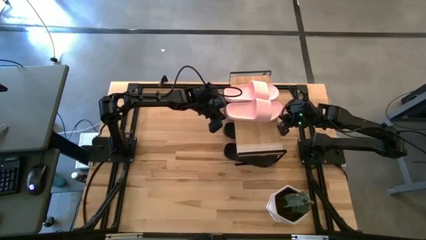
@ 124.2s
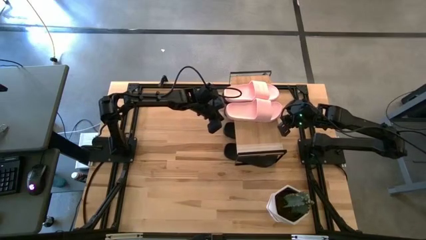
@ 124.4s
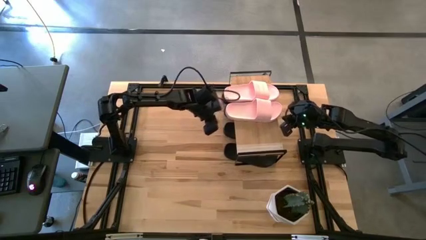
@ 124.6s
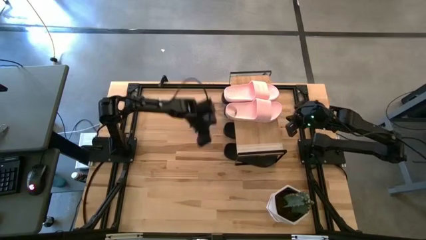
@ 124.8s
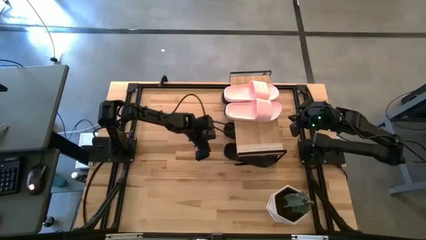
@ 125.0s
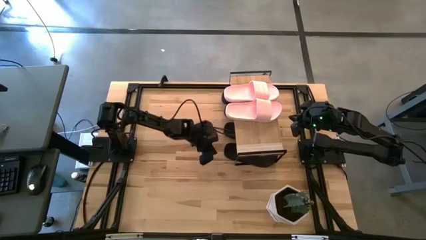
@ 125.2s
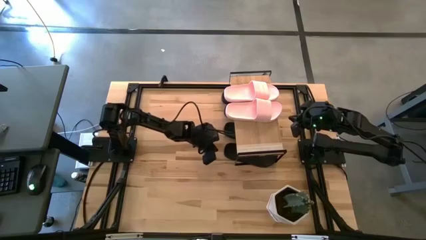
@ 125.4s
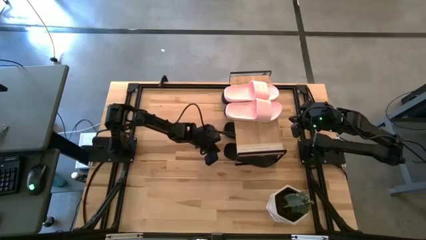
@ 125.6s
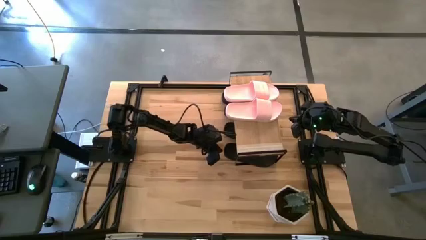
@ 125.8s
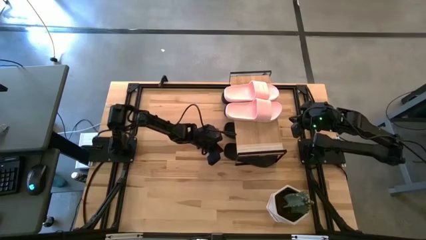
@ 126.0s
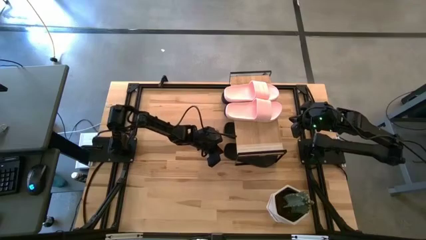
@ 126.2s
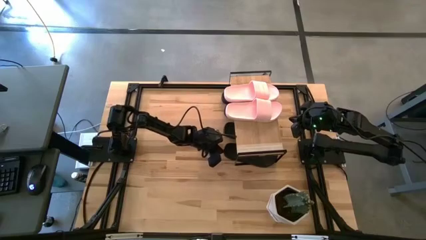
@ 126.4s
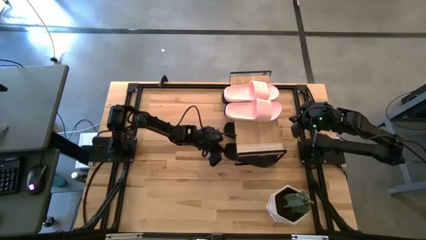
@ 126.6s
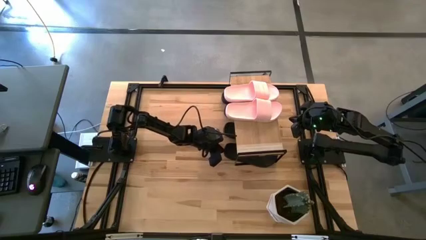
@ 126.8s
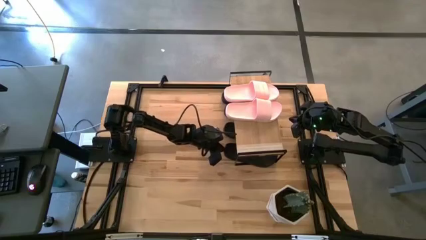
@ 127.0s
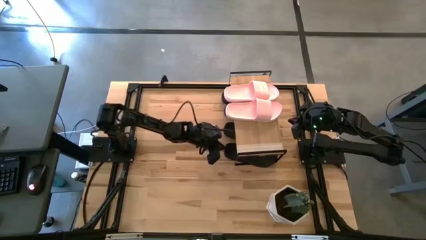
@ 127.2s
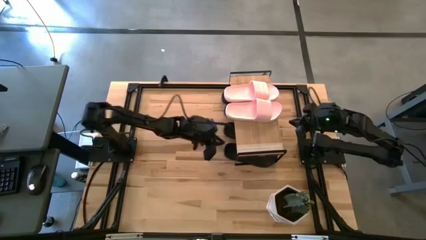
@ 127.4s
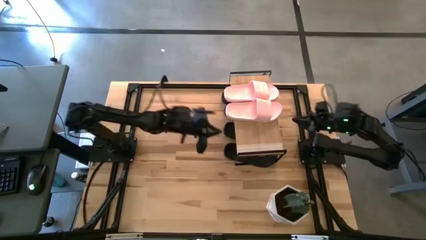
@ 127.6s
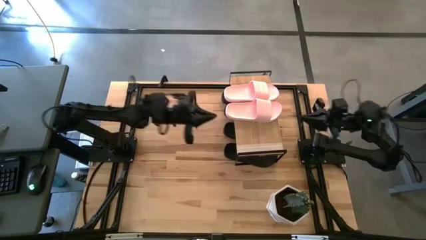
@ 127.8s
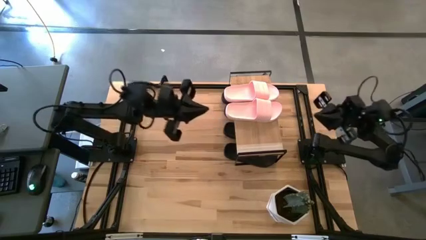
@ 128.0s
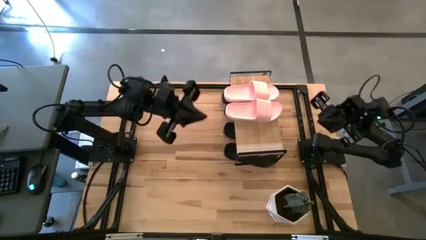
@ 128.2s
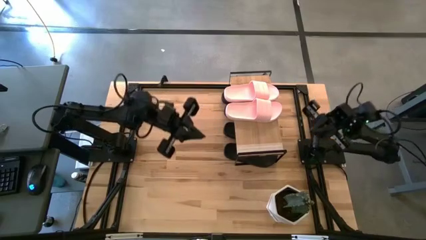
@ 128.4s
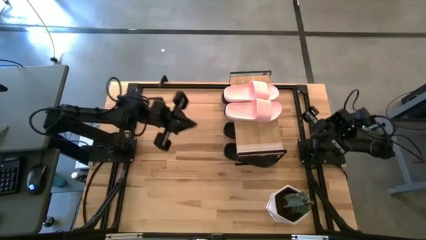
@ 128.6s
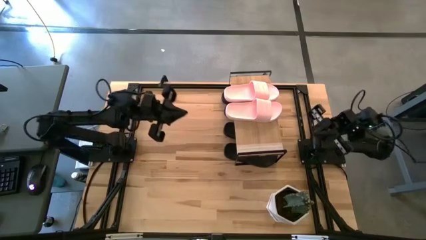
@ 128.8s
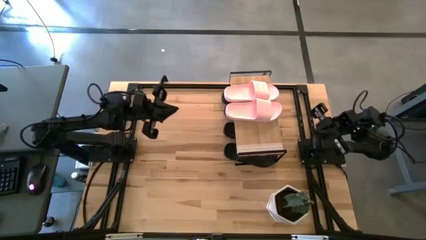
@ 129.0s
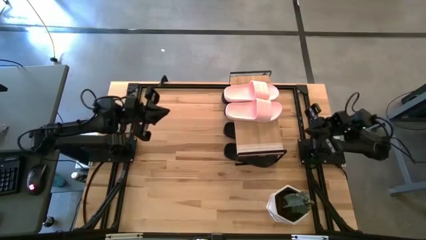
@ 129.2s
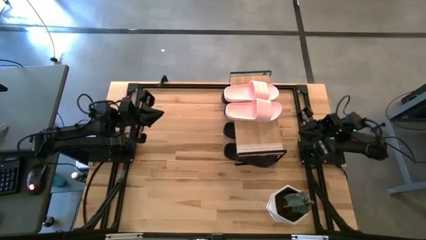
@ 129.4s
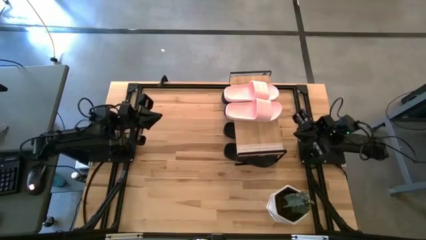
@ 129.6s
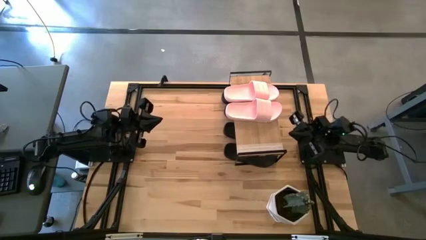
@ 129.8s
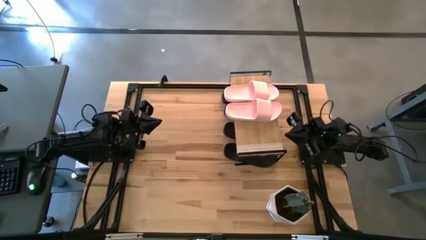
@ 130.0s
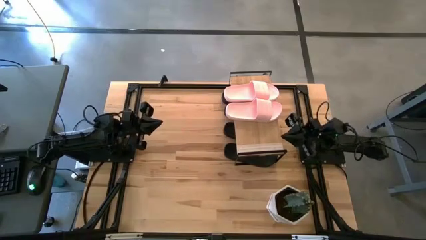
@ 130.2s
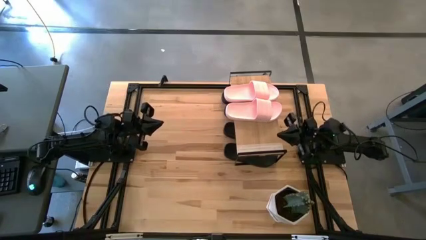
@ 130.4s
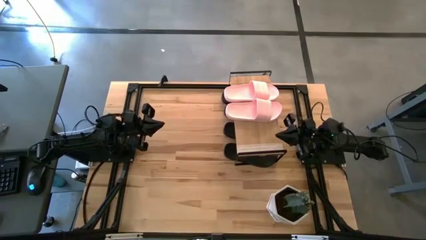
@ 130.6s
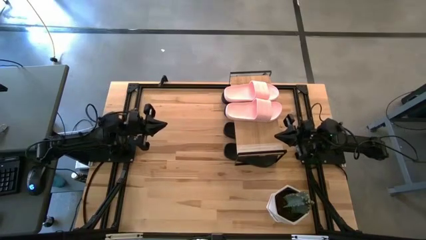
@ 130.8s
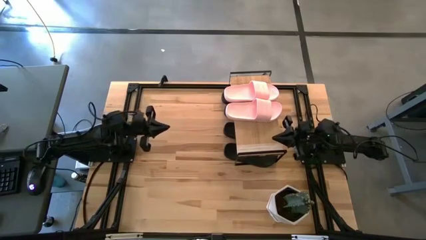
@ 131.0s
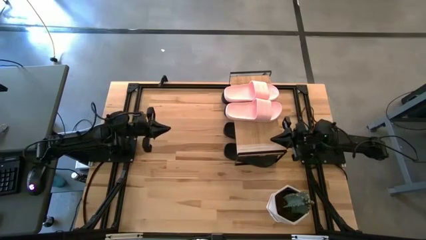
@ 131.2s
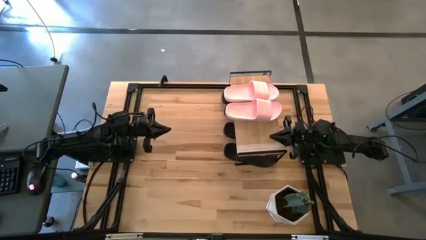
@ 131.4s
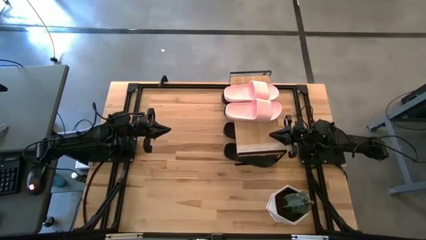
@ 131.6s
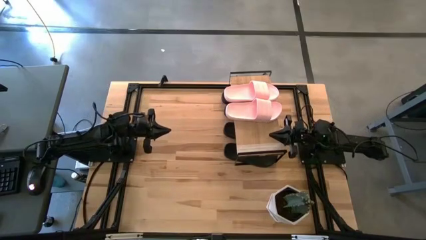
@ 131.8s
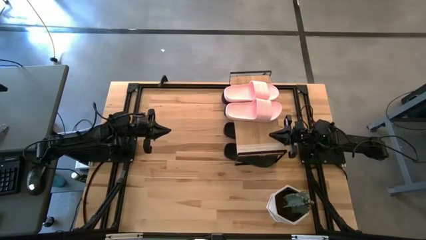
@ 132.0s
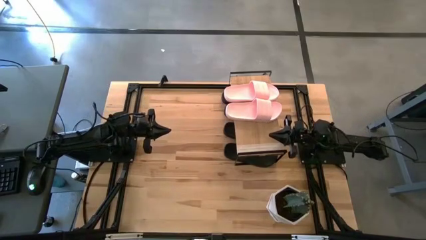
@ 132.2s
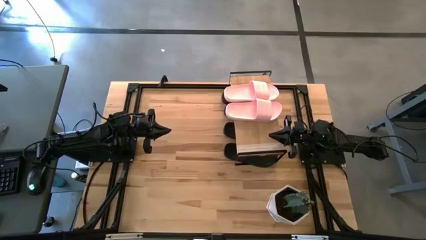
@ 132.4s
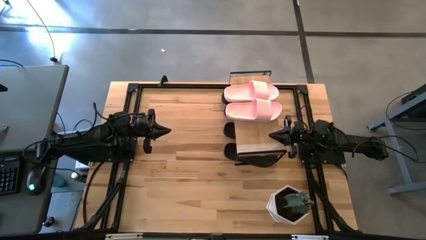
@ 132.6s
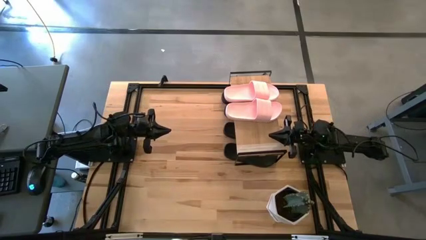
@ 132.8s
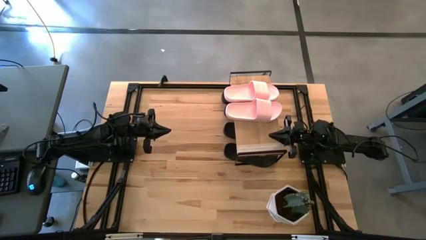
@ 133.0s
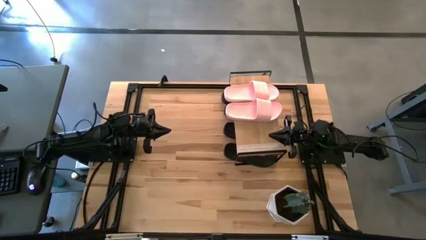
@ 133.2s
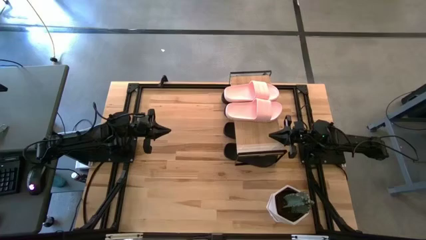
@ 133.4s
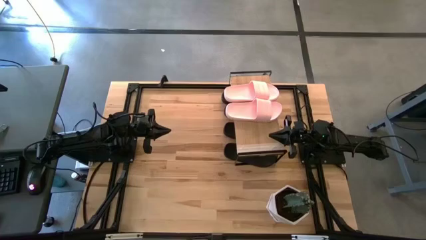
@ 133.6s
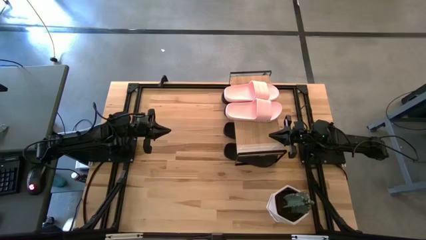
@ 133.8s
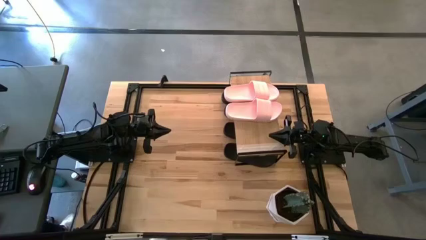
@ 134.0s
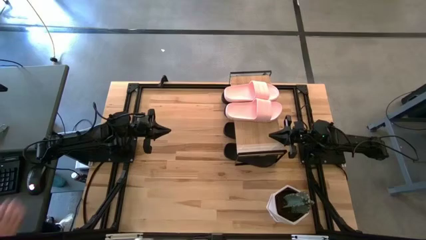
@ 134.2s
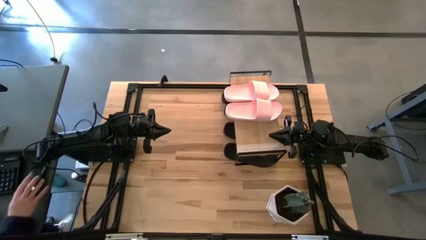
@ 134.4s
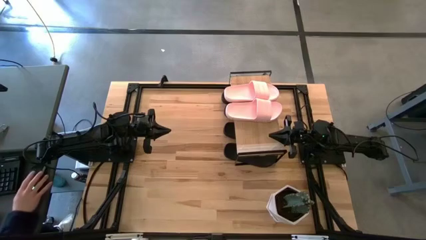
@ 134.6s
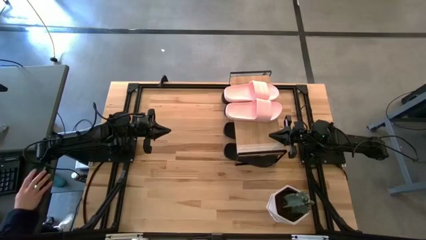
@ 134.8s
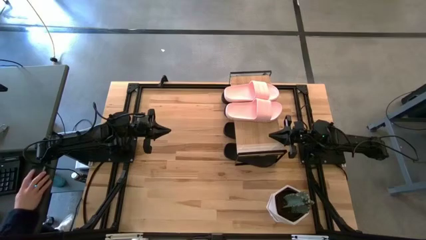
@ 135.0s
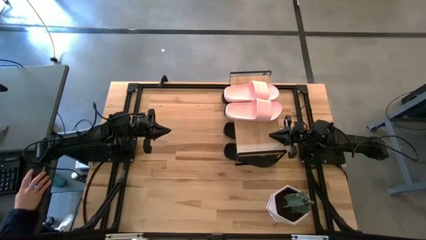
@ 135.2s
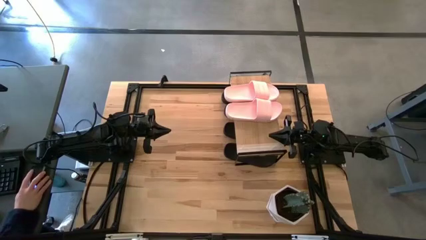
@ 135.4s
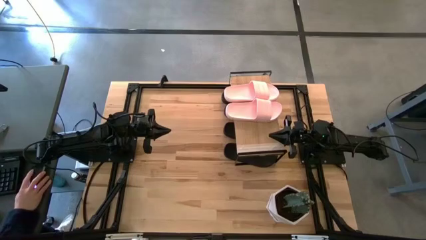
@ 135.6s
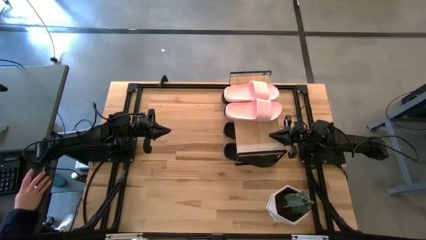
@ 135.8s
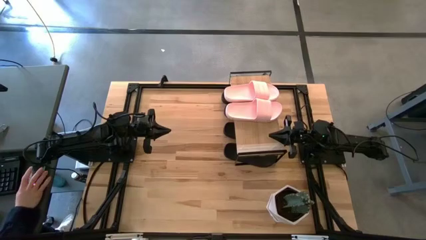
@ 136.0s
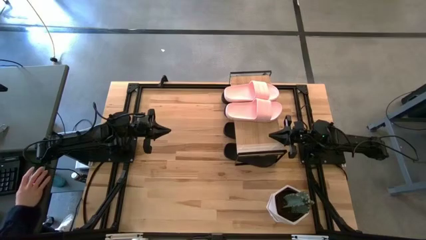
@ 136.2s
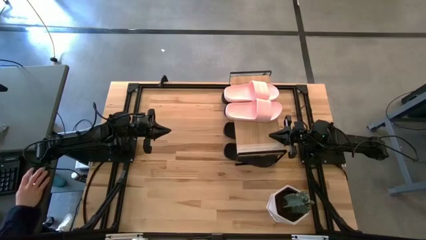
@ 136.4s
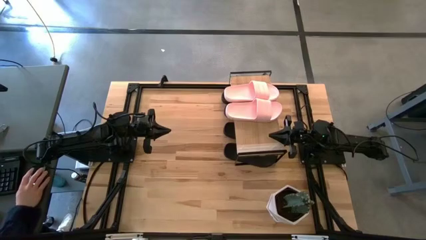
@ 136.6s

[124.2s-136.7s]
Task: Pick and place slides into the shelf
Return to Home Position

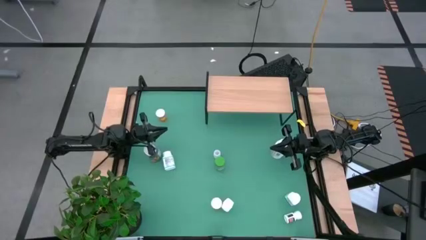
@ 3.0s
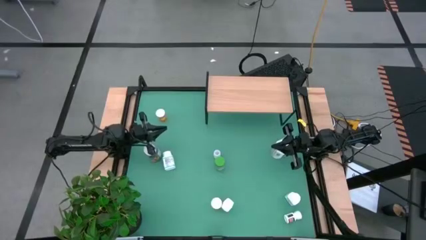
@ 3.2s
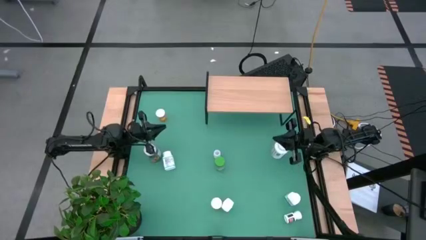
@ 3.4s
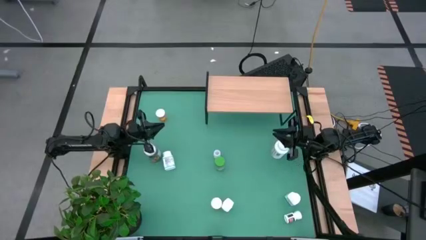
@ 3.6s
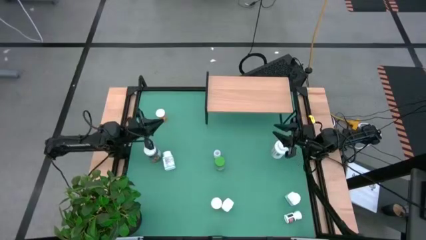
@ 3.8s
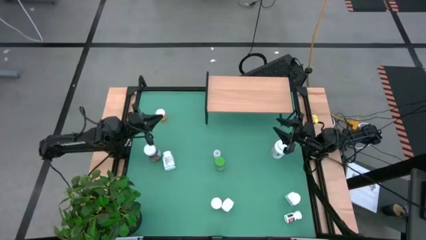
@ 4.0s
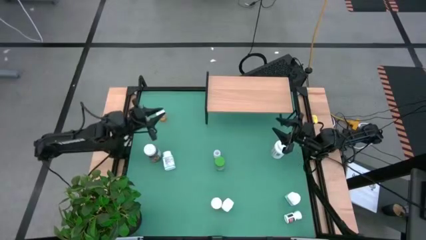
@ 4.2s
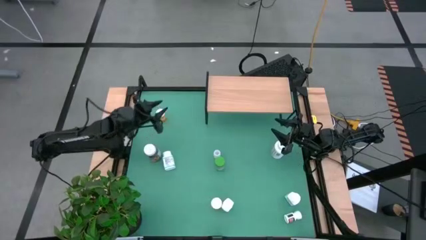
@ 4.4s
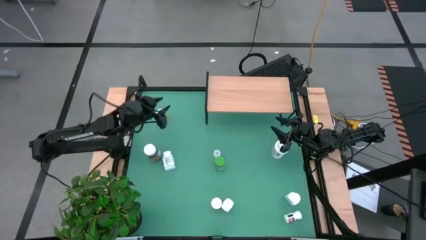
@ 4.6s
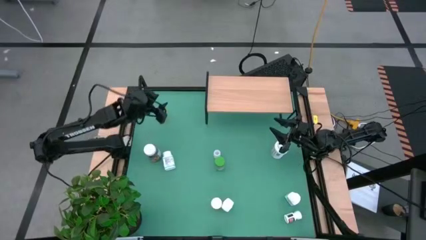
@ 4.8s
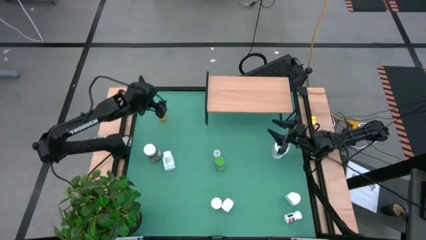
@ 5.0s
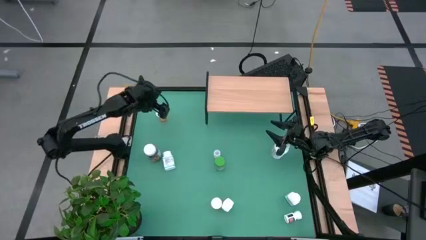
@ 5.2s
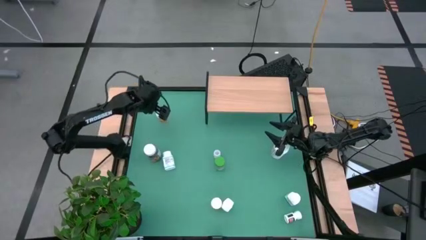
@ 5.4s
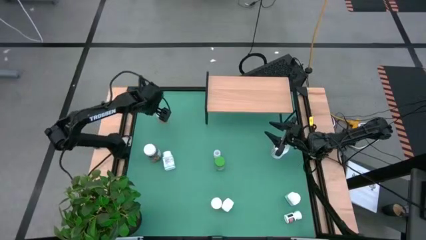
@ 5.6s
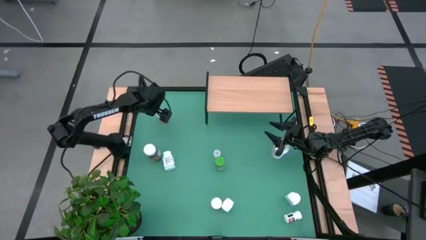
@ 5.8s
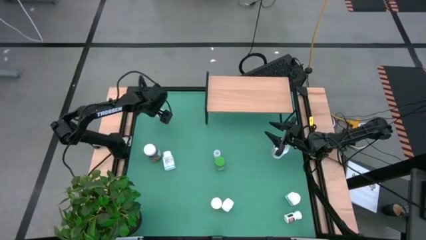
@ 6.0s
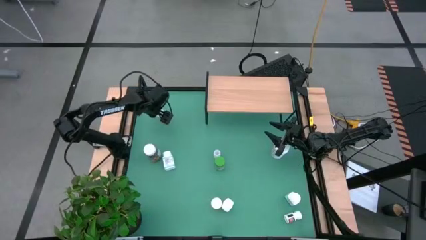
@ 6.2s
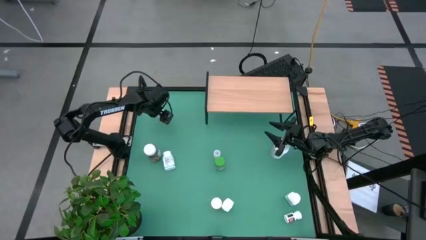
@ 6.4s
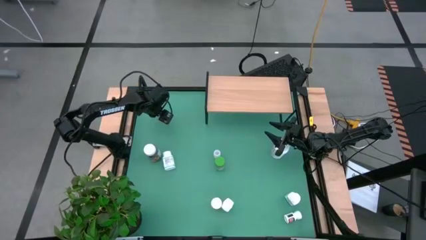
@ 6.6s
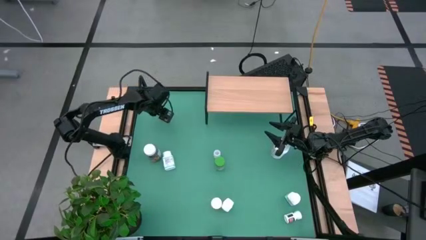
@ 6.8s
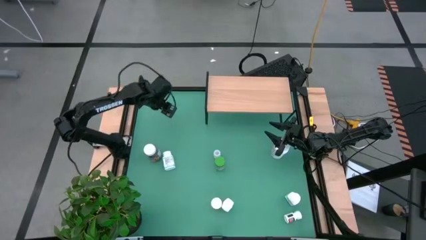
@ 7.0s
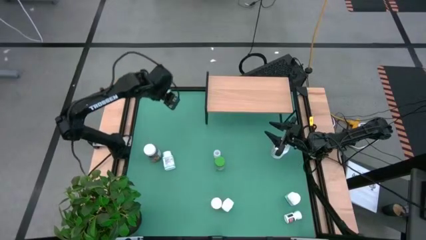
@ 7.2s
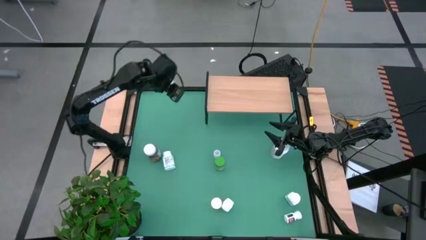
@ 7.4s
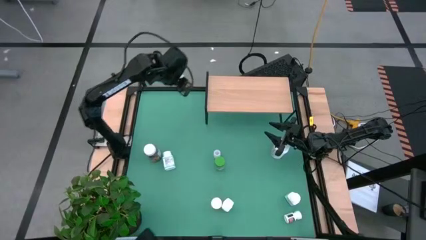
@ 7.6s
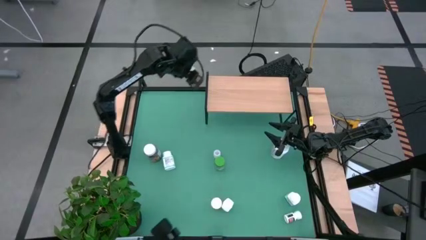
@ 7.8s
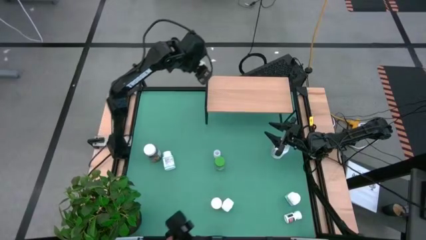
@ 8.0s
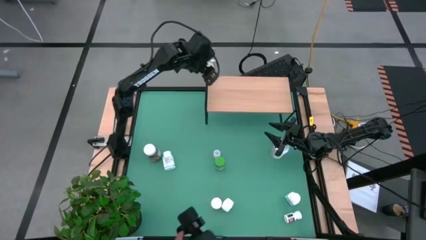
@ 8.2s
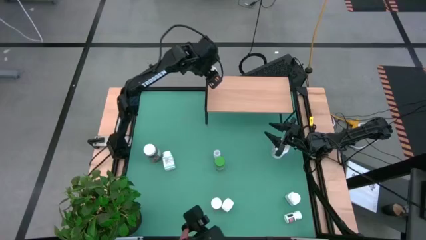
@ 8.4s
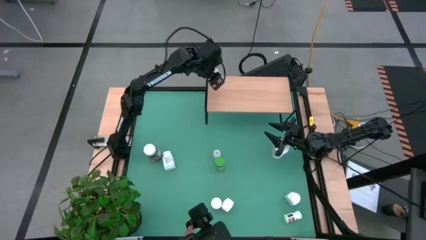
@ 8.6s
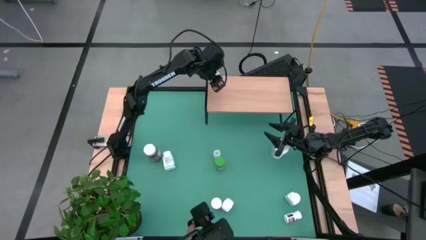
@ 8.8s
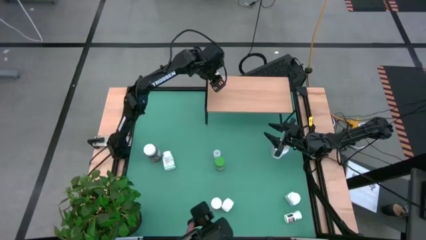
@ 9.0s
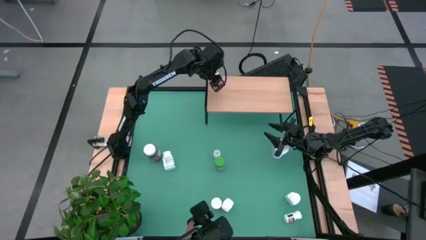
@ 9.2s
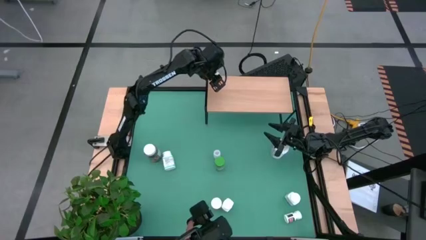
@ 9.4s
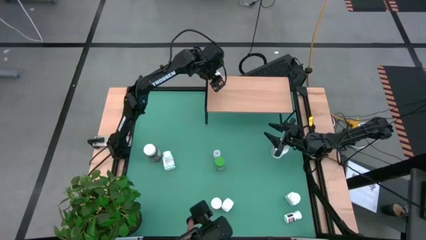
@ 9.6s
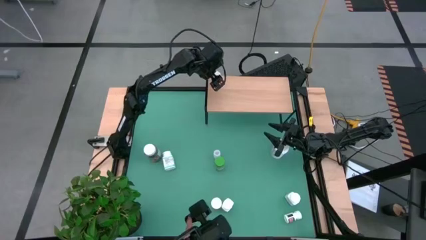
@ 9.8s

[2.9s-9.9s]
Task: Pick and place medicine bottles onto shelf by color
Put the top orange pill bottle on the shelf
